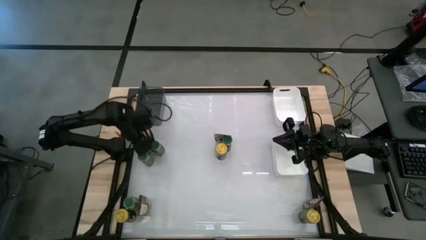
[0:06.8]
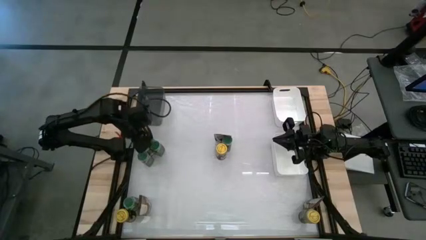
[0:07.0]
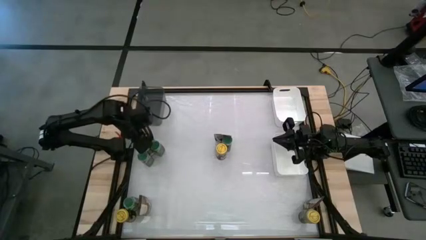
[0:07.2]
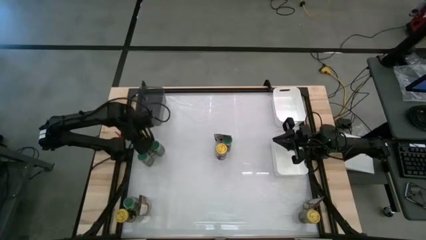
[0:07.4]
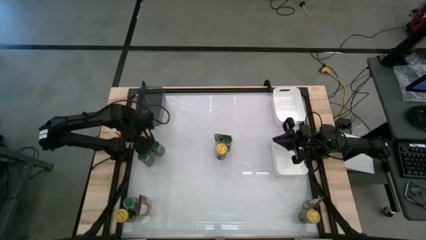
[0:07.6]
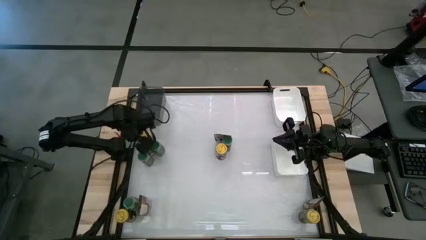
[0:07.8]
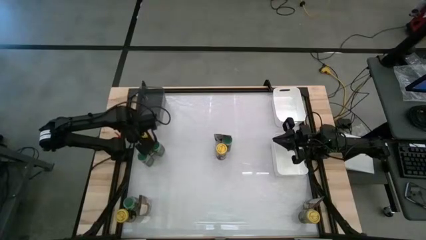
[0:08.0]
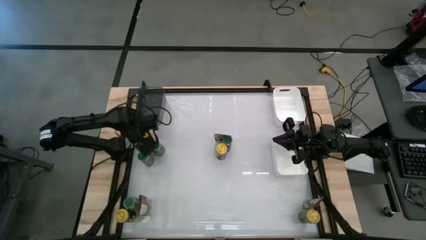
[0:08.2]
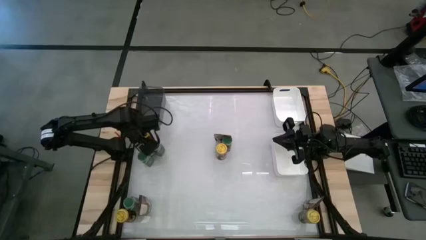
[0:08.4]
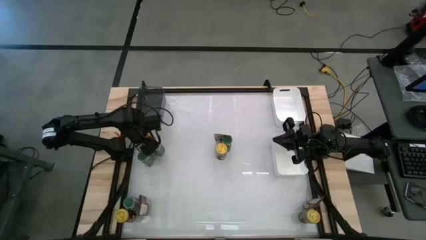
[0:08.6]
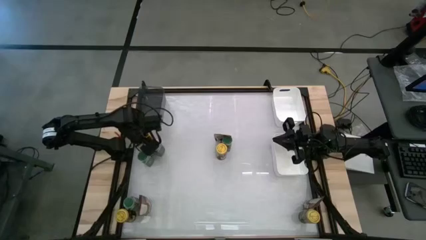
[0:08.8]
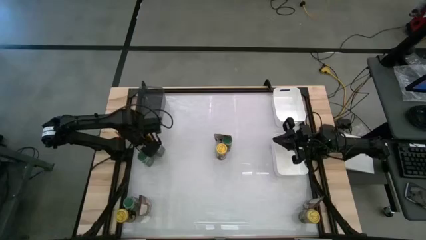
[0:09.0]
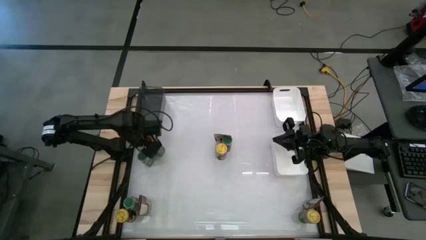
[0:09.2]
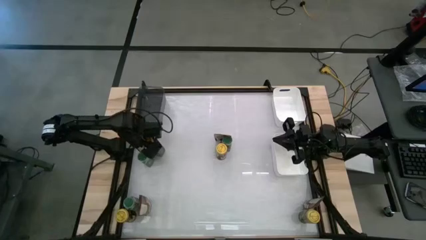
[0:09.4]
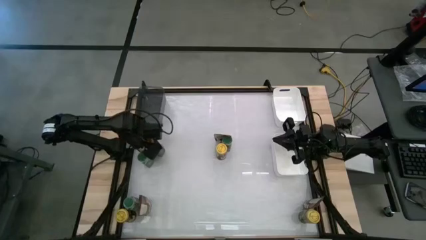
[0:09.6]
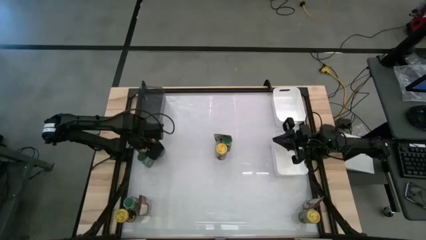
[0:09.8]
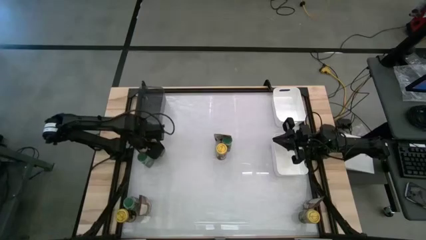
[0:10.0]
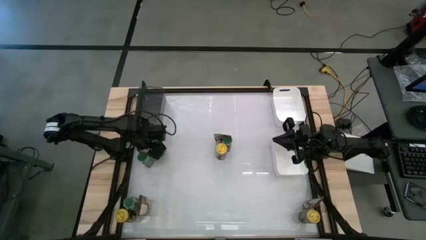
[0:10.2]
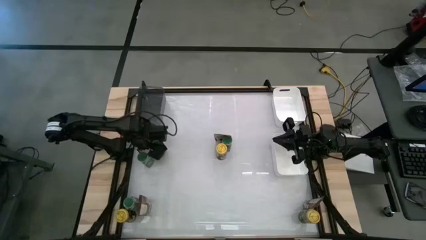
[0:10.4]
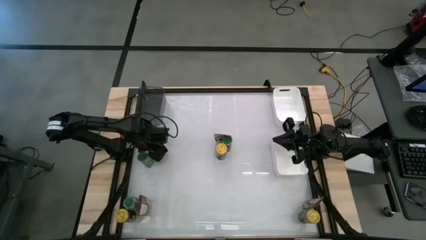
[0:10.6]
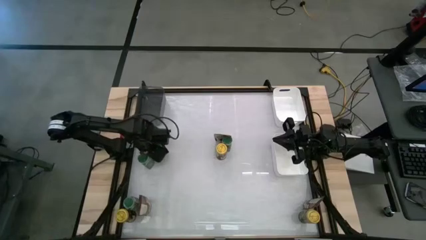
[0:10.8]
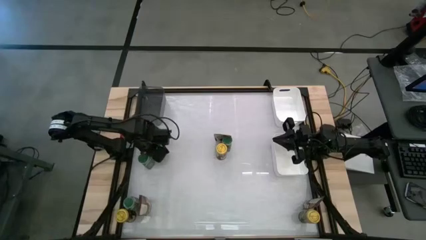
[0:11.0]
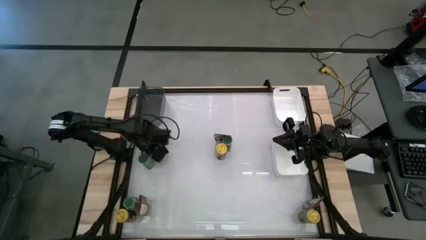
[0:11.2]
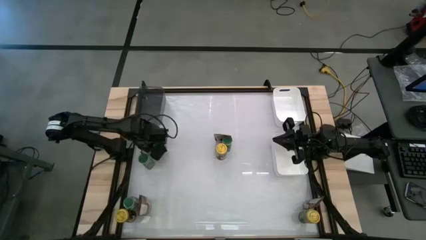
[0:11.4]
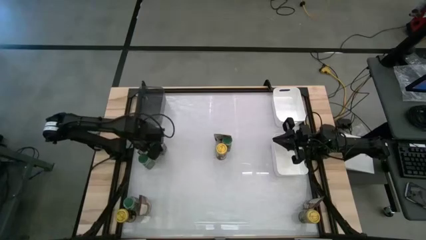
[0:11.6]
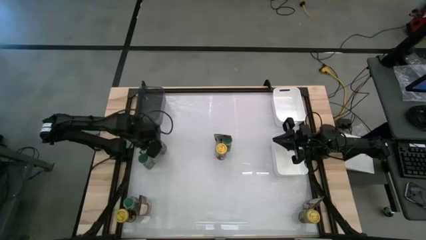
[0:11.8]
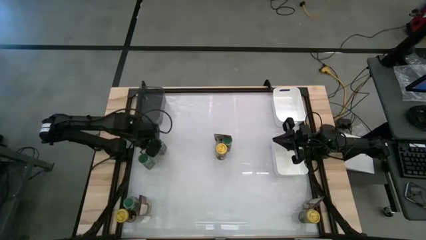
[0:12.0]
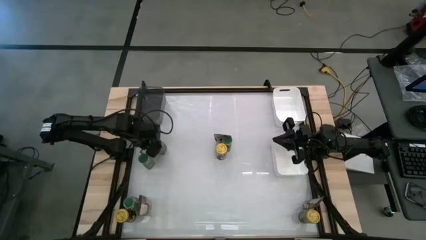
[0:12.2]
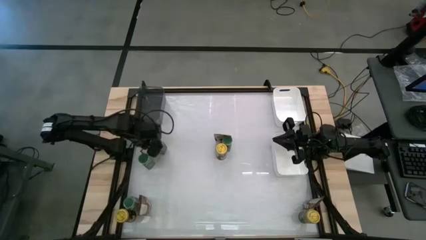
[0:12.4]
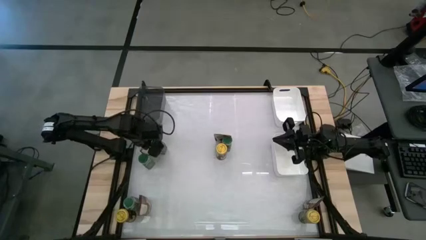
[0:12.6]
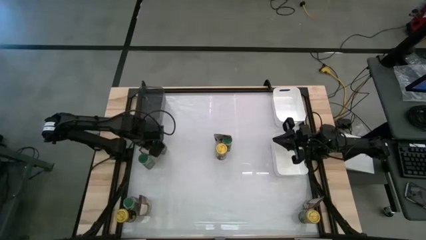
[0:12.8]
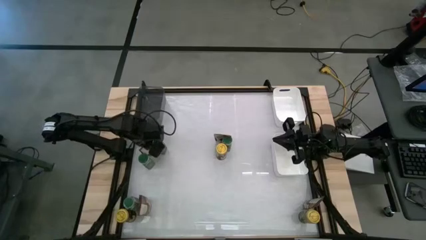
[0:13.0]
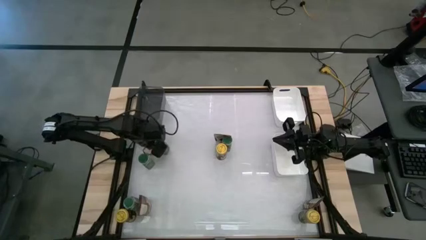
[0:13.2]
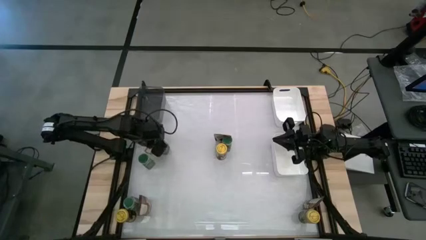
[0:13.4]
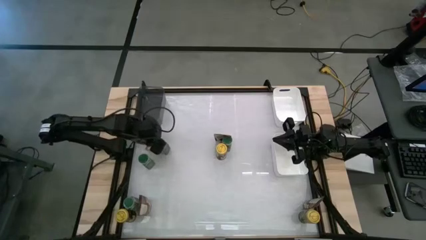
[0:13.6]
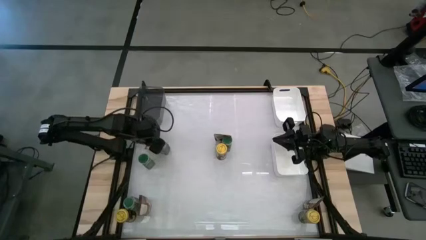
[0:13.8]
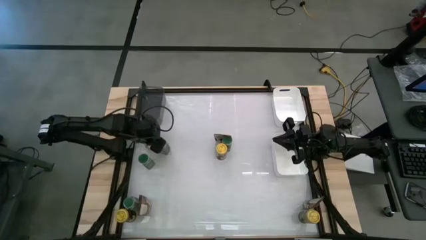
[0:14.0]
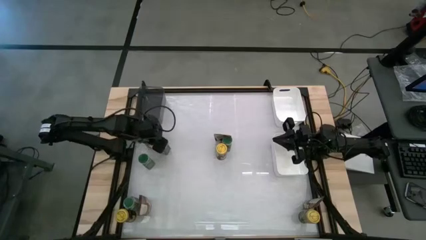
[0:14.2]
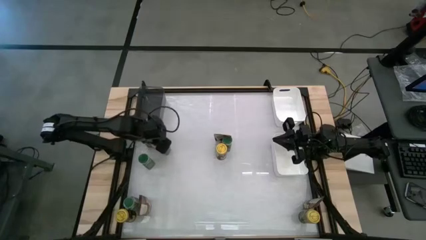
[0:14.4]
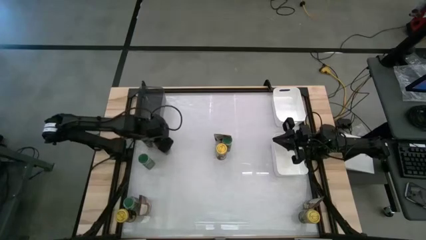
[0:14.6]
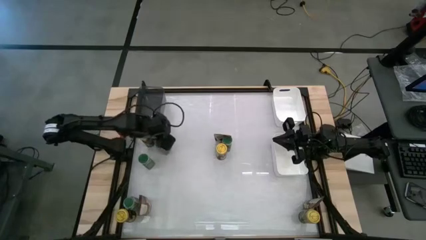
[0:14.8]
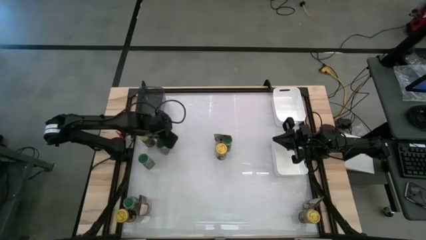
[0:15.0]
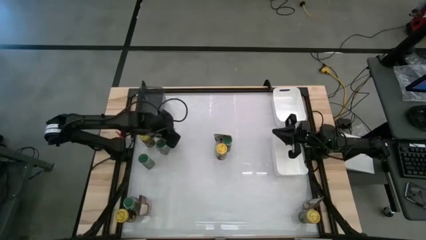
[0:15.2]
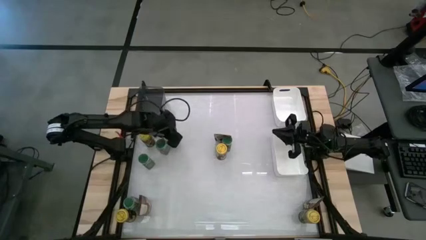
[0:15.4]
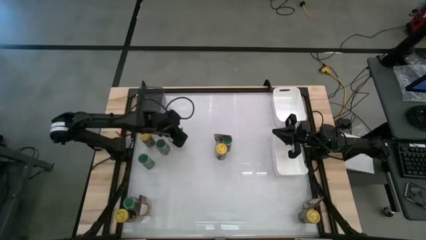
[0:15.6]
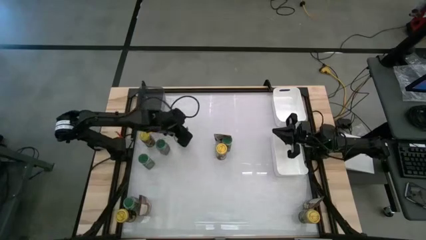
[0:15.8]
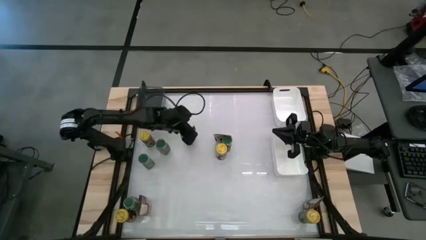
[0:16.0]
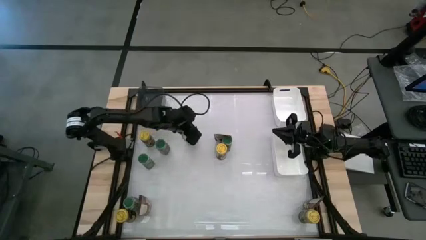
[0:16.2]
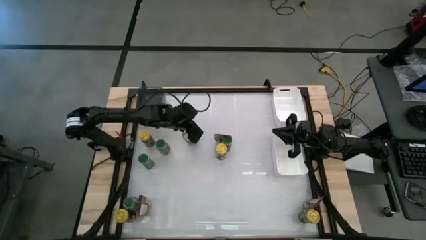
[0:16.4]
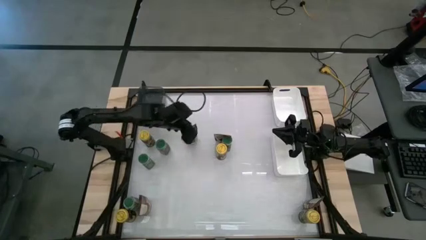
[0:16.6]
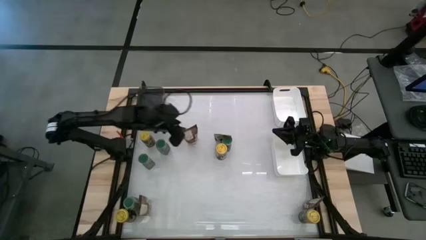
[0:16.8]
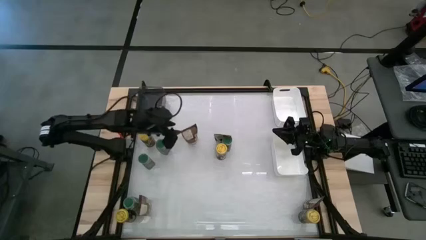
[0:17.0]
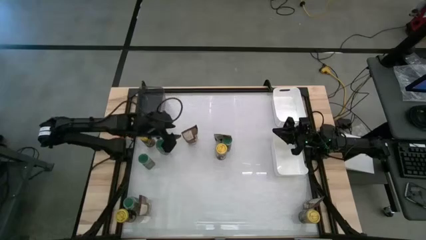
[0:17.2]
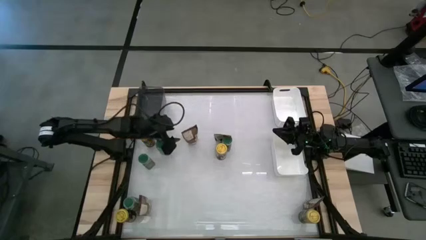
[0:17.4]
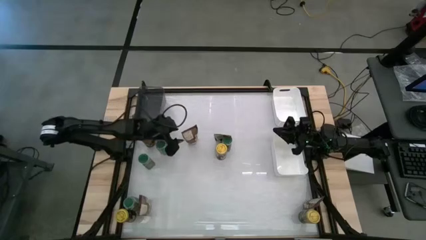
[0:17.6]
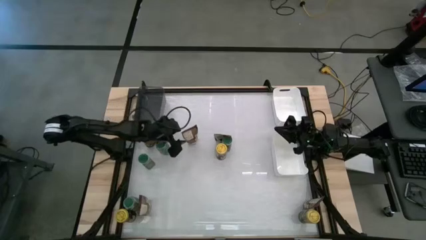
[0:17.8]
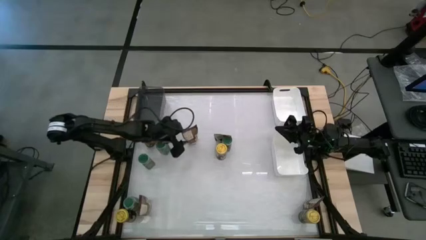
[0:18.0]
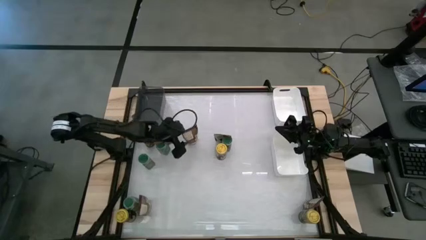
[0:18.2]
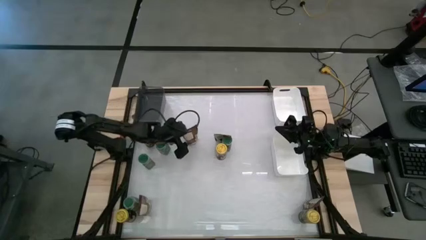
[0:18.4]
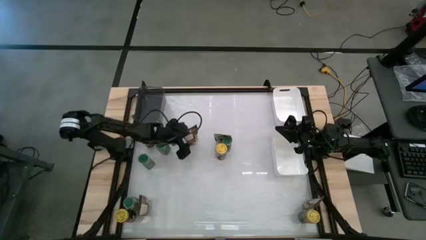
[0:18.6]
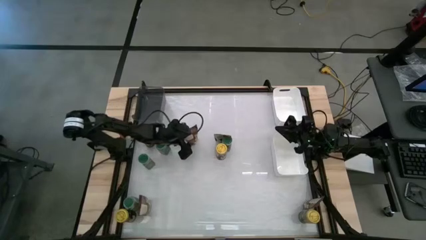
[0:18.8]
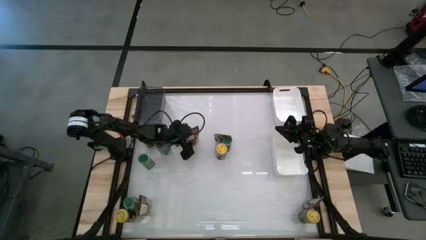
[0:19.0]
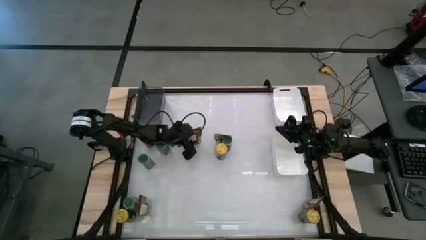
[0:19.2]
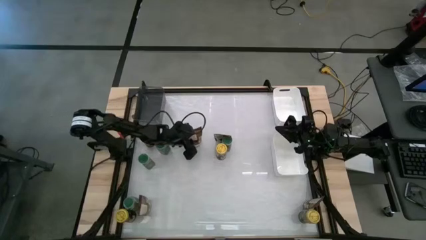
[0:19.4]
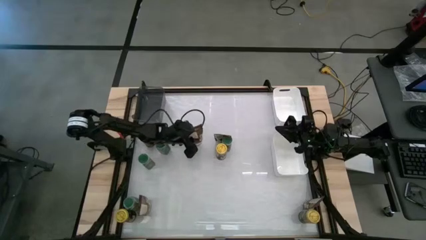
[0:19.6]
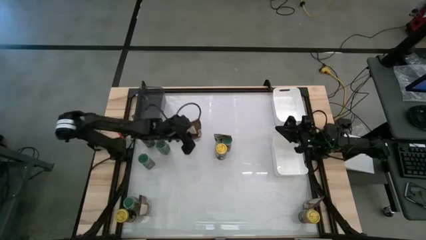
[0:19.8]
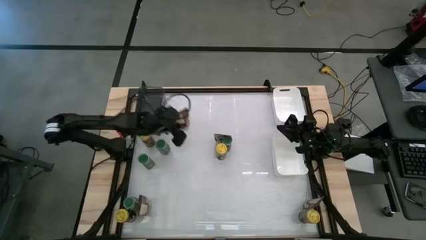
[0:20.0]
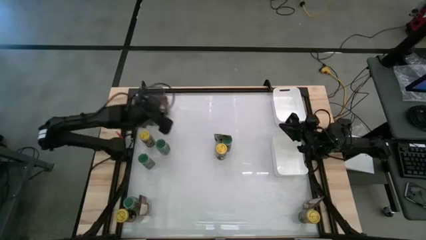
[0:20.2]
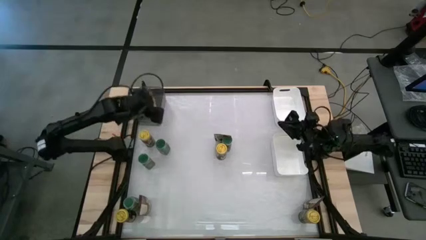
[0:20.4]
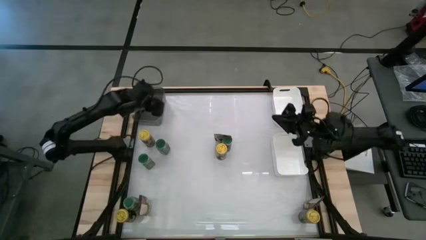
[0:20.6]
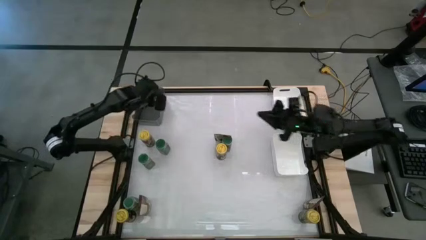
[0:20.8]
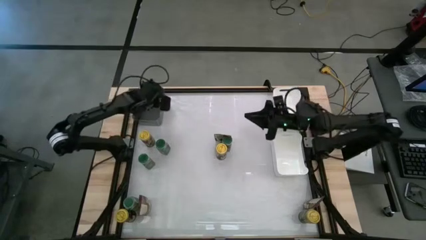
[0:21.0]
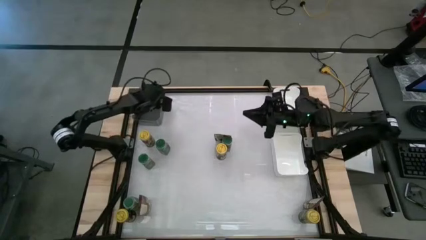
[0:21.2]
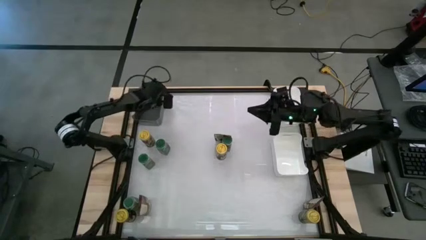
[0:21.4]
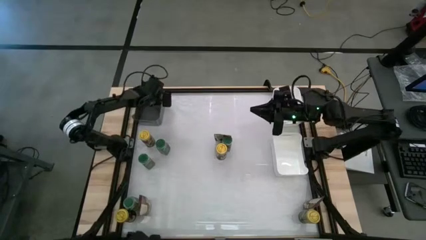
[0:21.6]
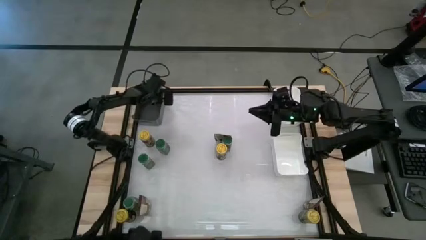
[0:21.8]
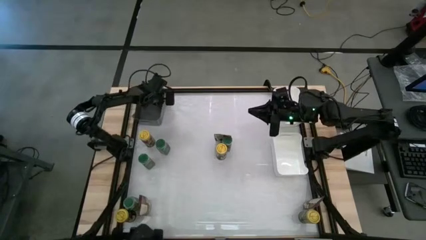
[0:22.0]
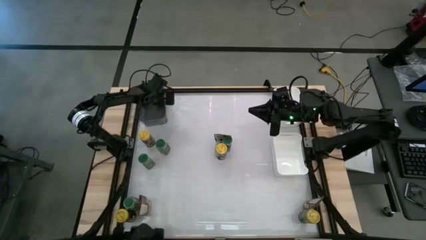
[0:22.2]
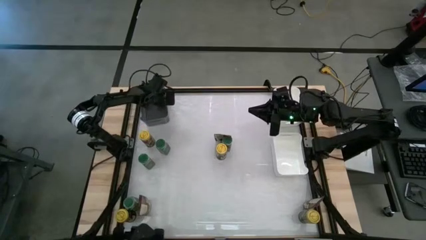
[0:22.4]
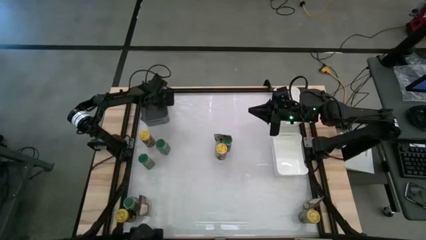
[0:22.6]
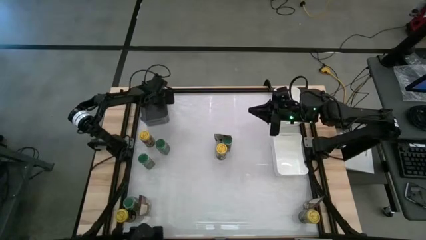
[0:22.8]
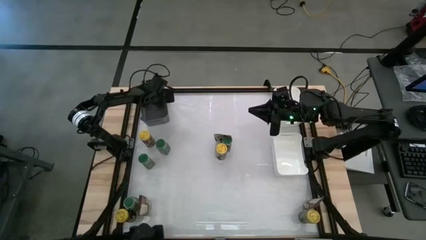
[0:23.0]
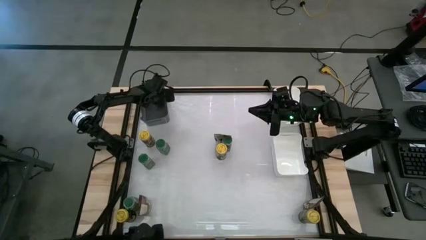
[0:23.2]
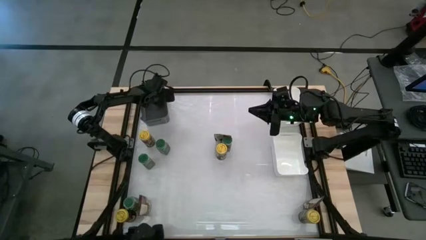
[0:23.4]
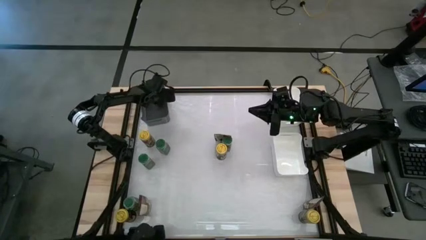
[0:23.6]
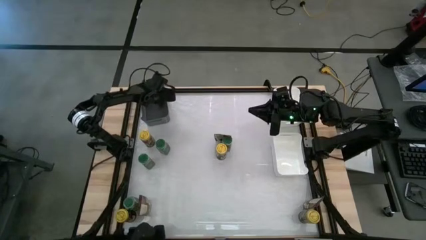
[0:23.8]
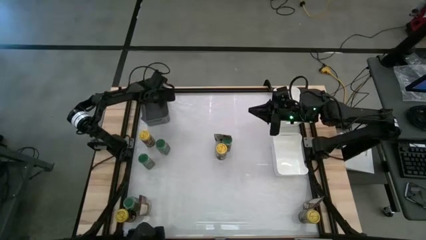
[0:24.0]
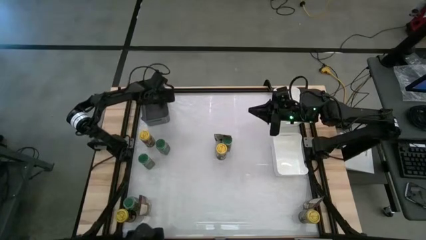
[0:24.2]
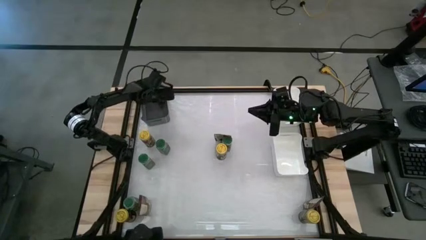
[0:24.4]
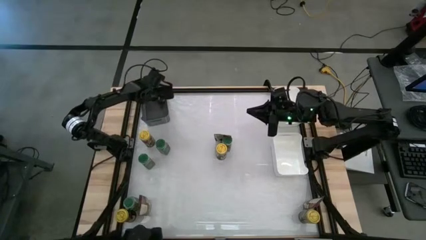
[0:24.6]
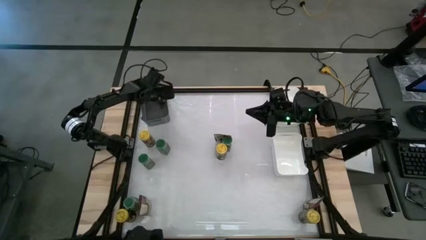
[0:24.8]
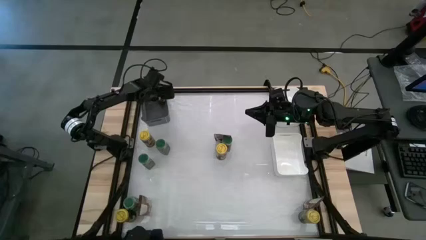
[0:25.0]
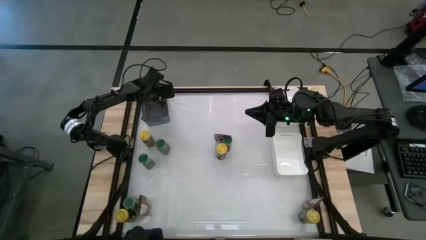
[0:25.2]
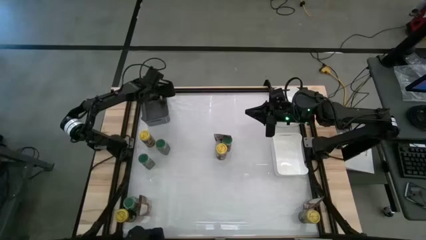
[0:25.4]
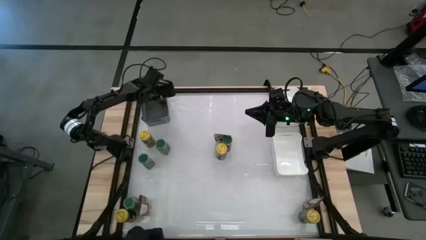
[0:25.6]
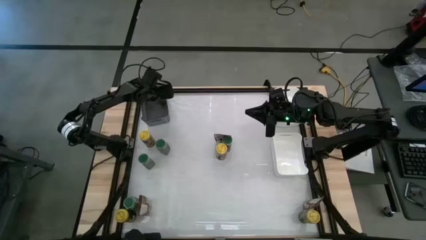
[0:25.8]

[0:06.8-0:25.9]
Task: Sort spices by type
Put the orange seasoning bag into the black bin
